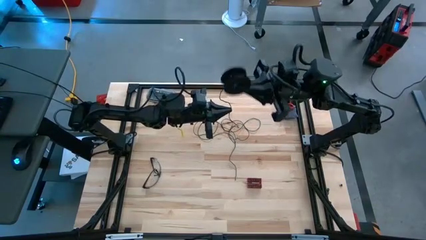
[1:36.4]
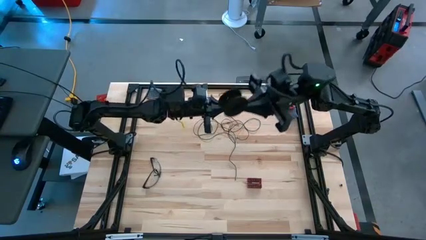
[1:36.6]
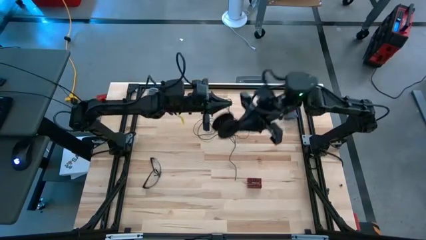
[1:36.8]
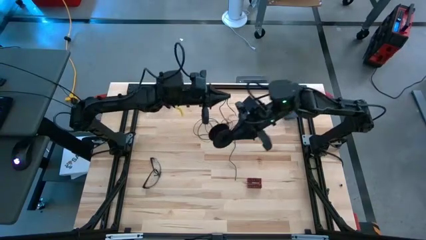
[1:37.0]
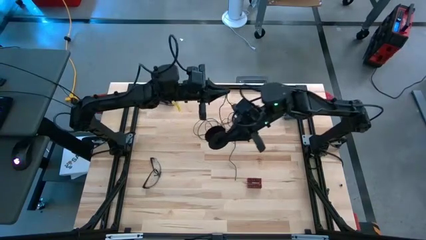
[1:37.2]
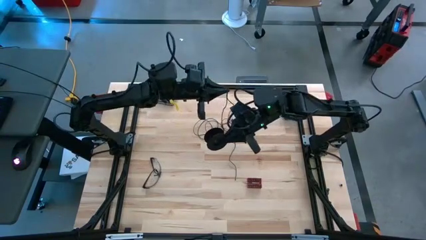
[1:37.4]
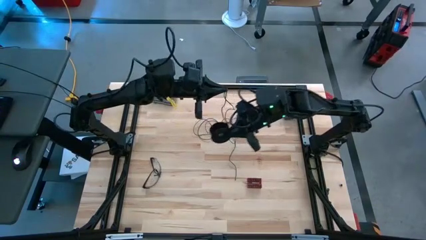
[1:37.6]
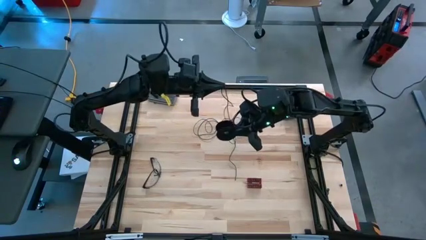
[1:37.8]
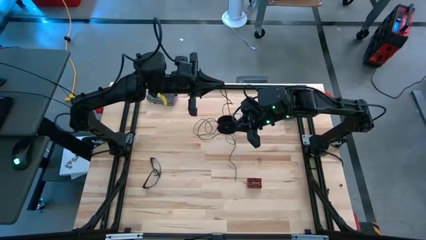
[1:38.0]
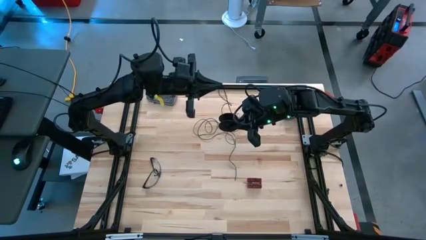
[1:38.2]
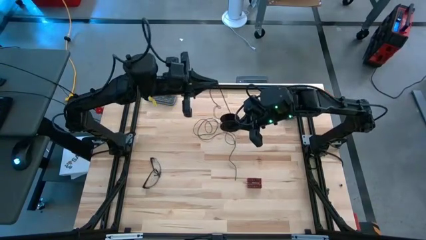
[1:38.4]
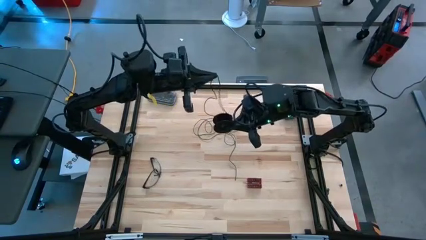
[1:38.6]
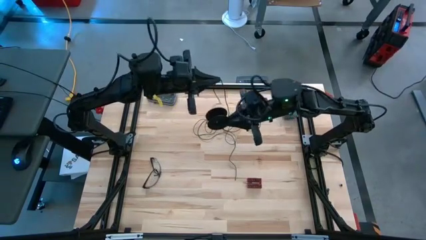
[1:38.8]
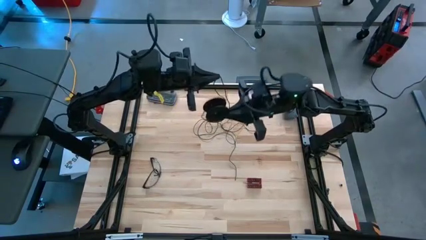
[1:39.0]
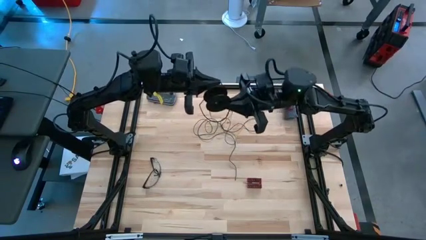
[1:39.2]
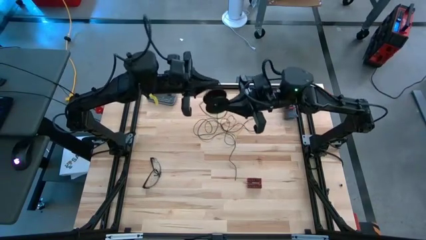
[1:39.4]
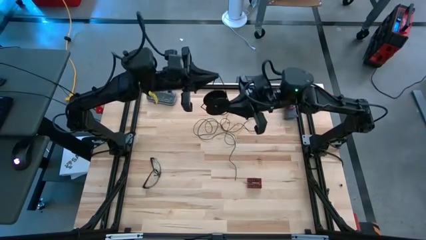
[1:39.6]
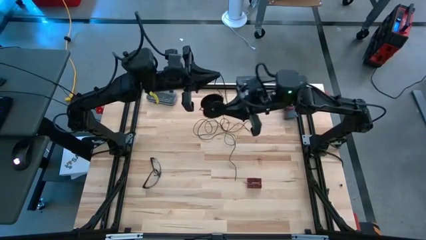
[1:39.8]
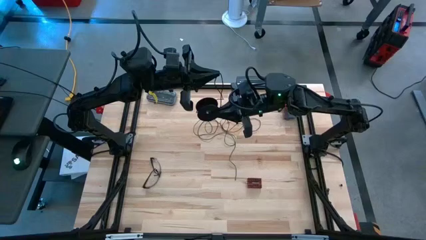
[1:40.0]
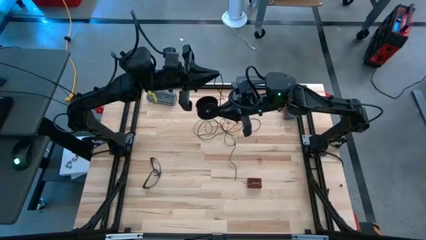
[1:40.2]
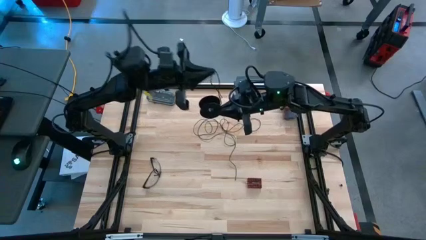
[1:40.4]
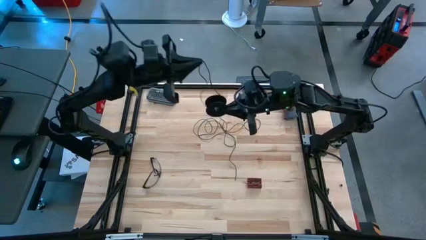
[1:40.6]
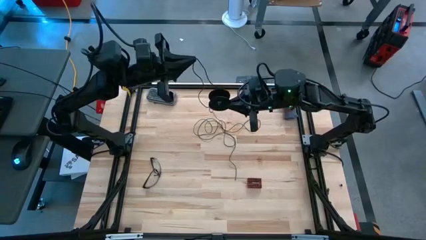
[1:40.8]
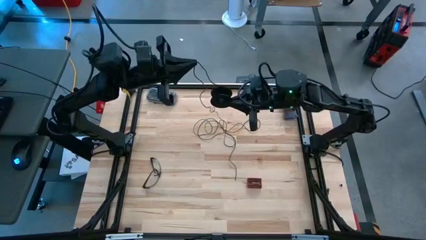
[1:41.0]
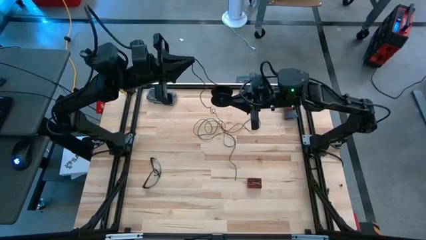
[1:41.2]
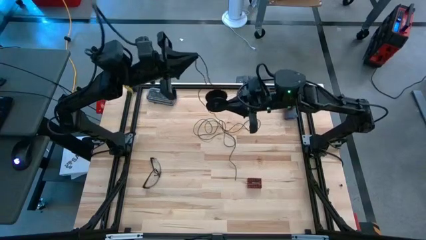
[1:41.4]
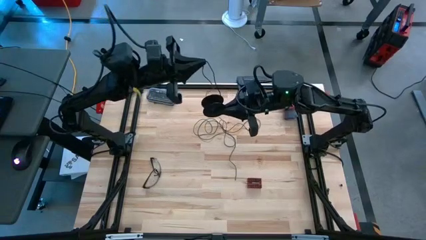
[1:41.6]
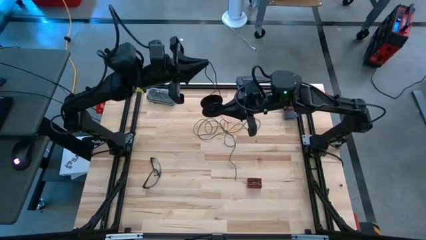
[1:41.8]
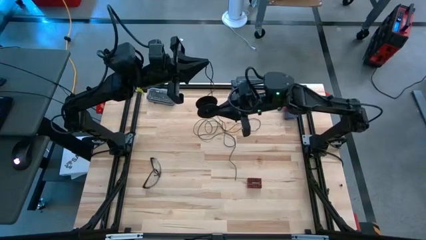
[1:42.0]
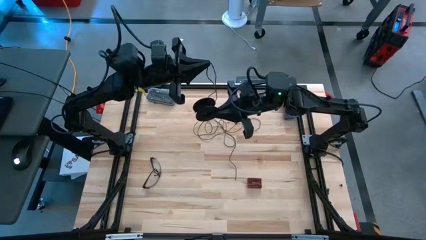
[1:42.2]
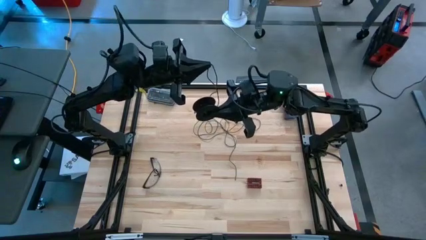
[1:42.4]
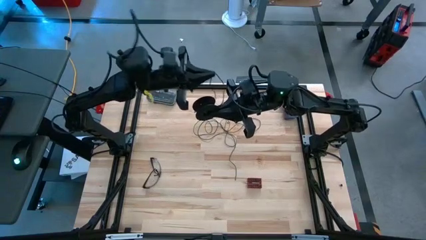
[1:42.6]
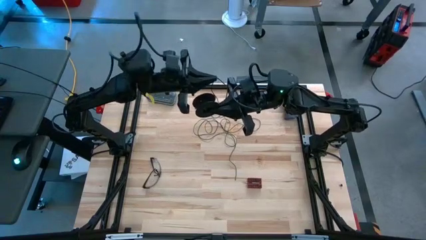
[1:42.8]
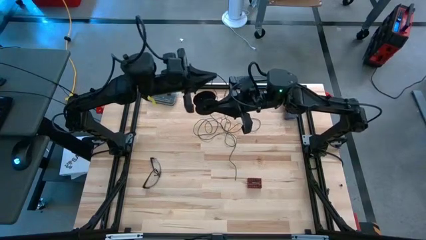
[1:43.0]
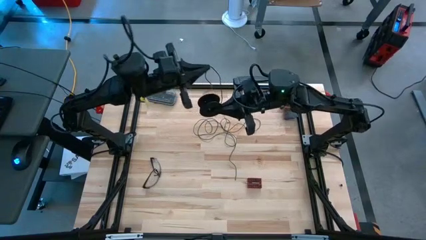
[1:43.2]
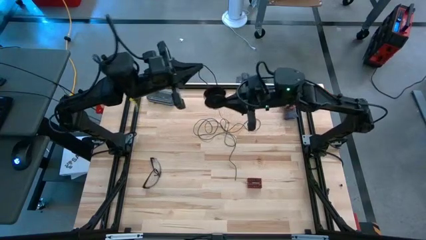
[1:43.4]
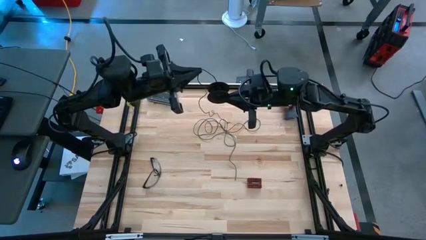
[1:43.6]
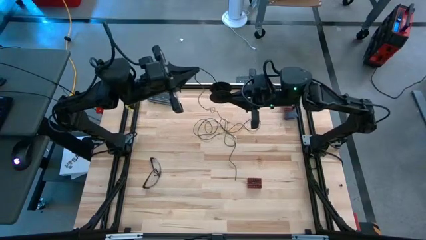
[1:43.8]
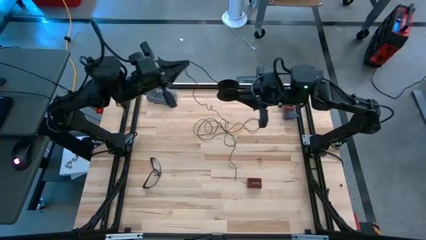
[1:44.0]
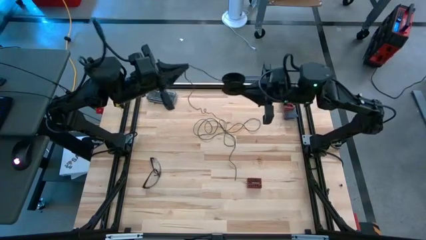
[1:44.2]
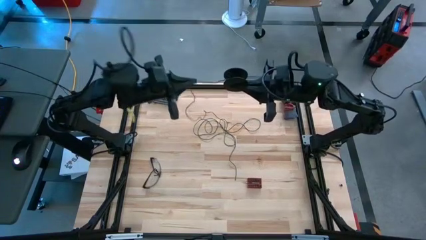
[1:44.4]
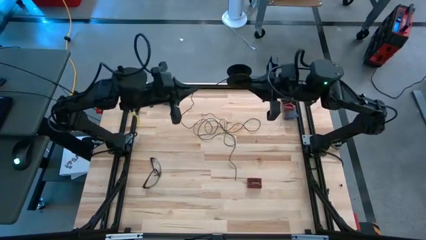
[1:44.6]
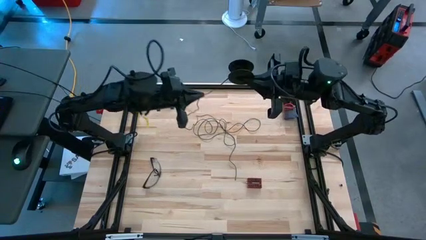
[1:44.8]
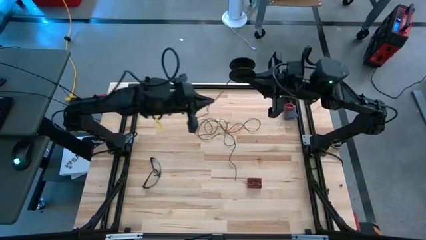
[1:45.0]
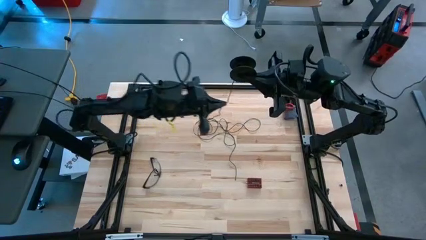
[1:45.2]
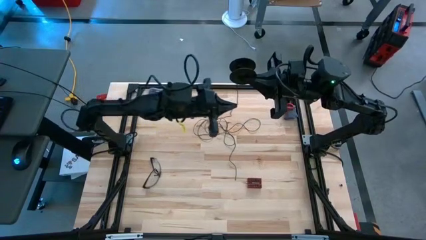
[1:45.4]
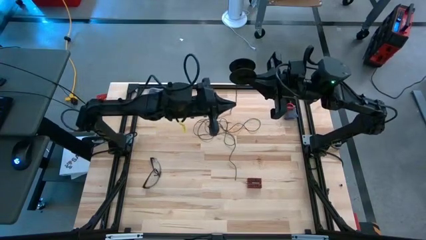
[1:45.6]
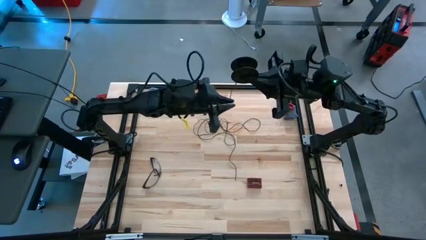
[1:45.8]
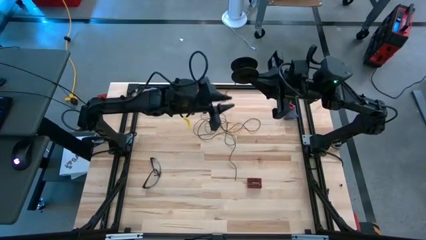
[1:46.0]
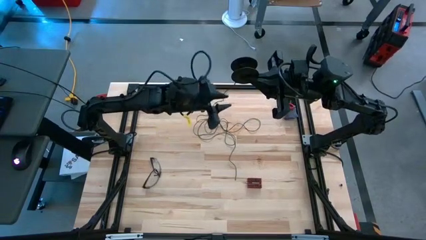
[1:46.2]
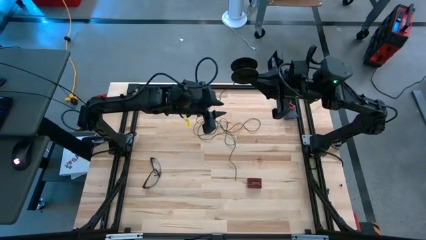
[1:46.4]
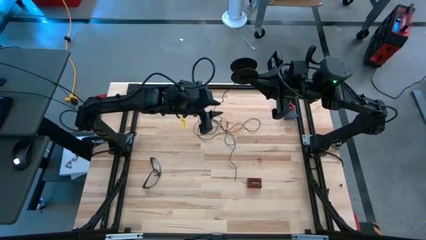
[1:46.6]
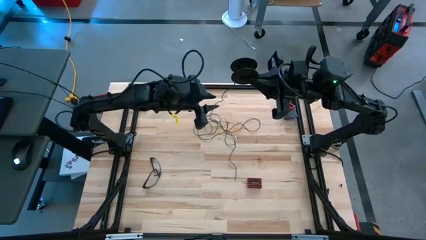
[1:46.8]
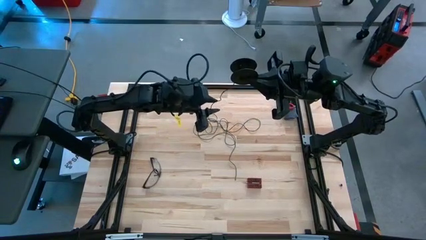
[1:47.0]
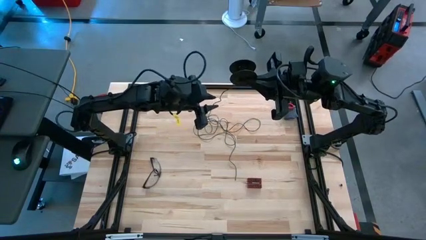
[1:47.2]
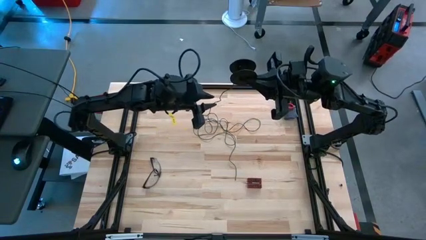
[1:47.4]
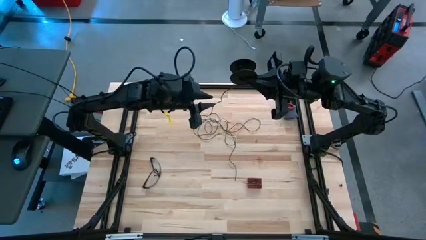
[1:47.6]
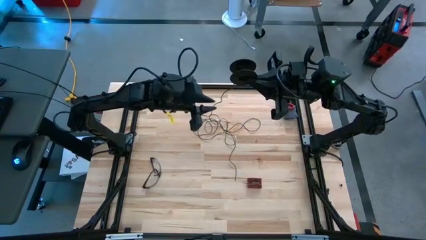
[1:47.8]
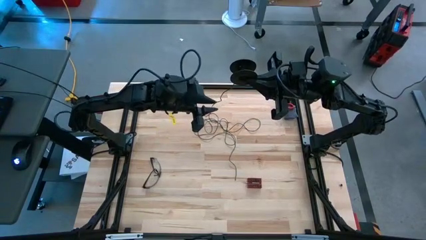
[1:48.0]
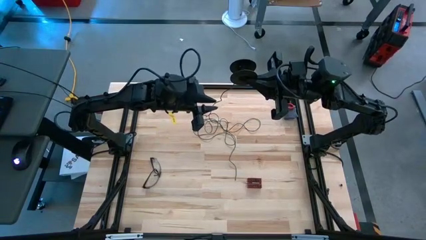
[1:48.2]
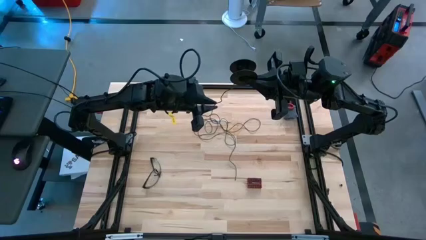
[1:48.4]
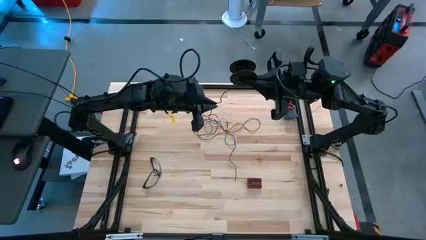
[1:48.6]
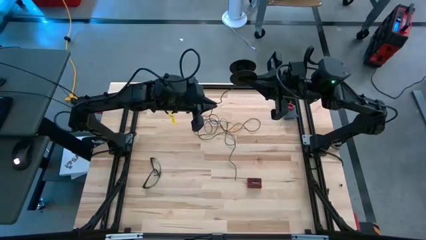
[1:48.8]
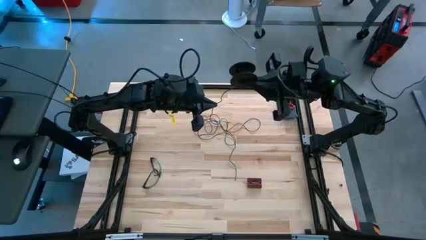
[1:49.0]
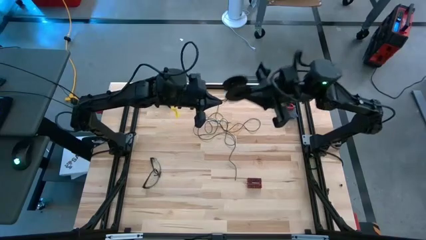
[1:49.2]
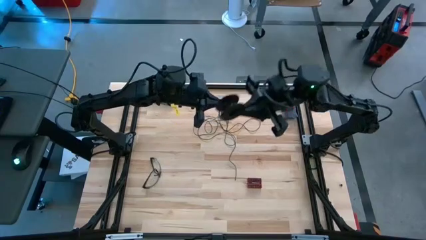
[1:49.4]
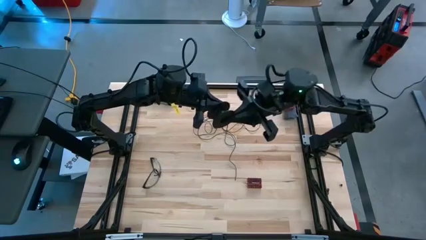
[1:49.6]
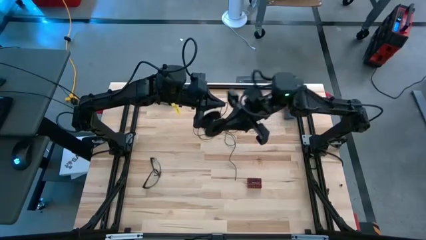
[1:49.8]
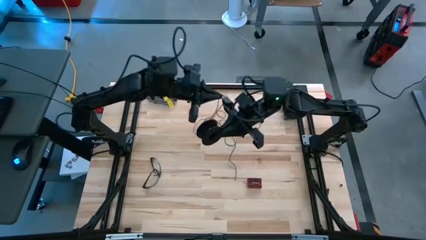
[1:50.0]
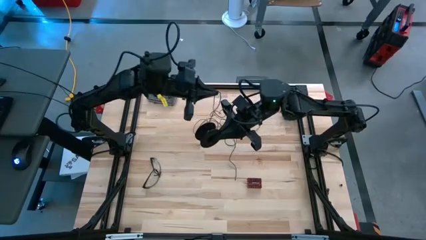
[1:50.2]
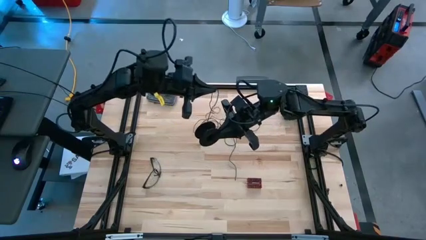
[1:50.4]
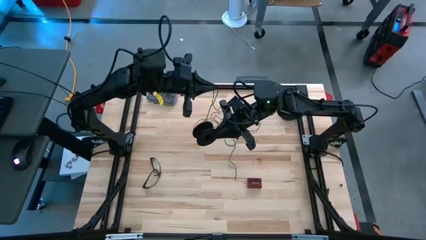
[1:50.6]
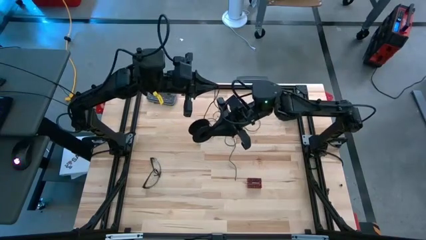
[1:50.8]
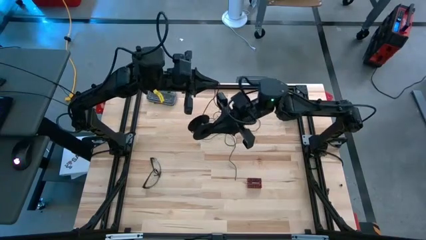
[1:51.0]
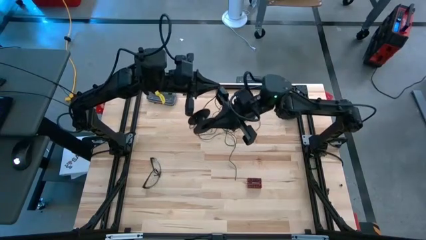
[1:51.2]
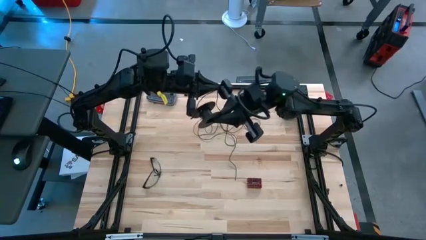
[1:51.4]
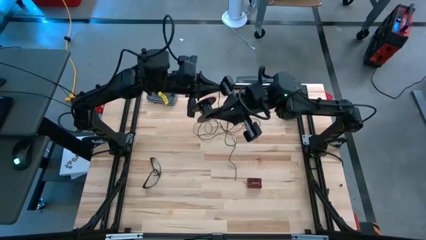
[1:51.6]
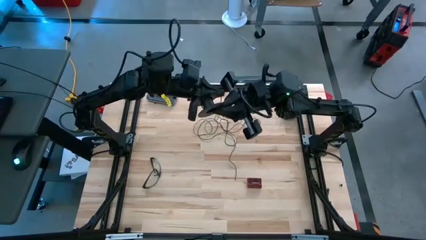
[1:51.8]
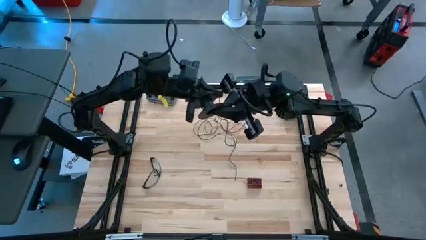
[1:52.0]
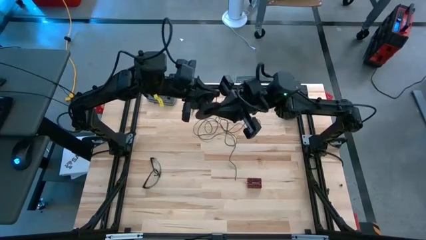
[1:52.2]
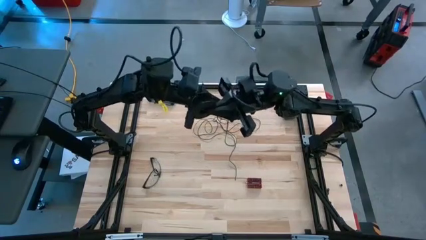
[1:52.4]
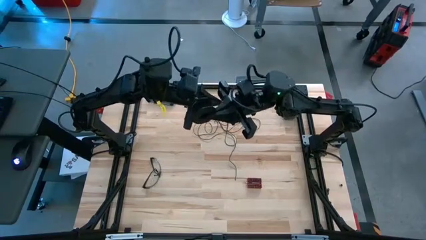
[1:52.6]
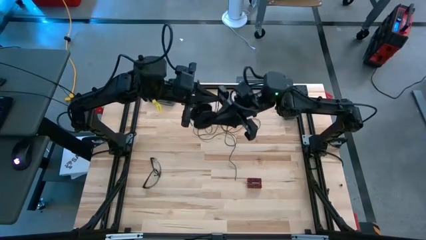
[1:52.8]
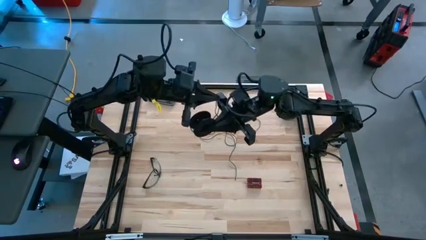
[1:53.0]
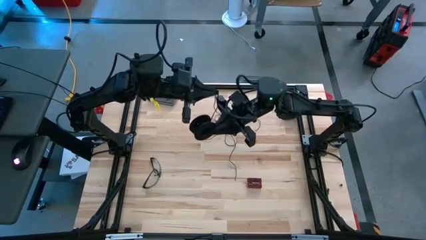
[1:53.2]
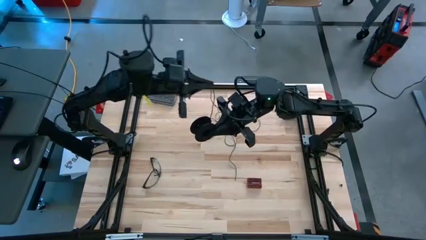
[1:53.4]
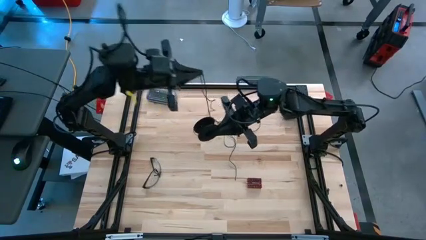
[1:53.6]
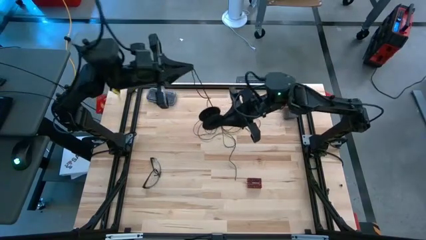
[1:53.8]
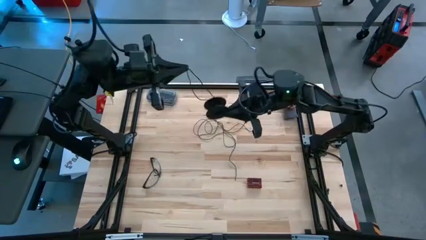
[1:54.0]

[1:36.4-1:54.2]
Task: Coil cords
Coil the black wire into the spool
